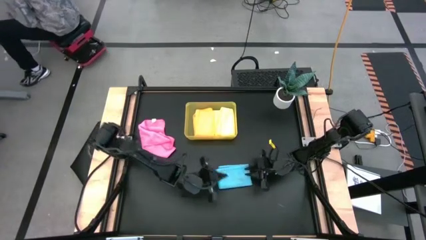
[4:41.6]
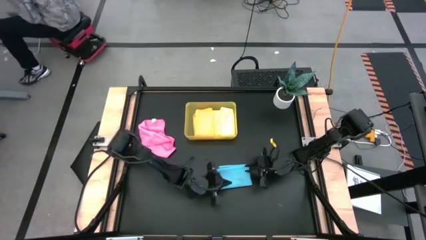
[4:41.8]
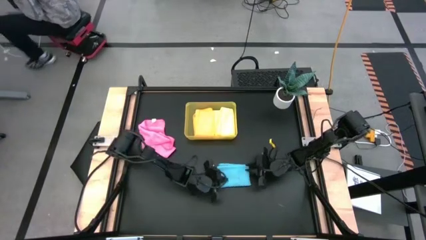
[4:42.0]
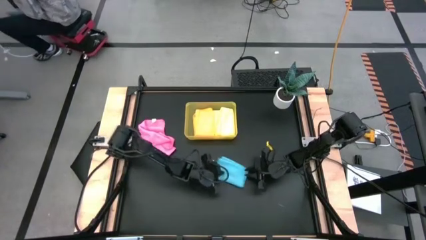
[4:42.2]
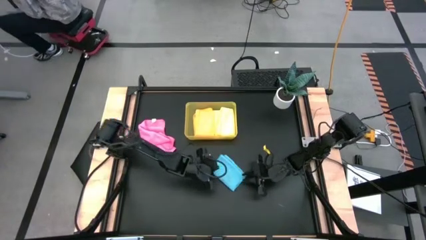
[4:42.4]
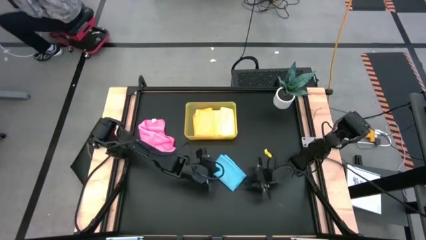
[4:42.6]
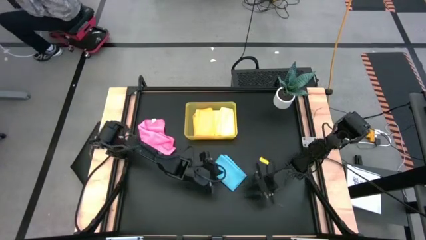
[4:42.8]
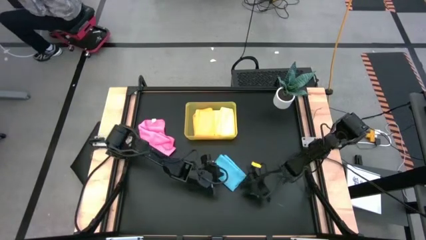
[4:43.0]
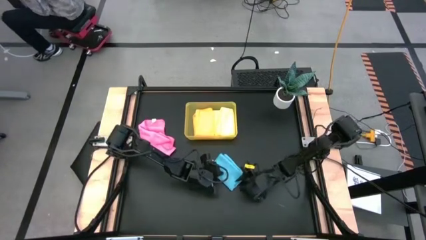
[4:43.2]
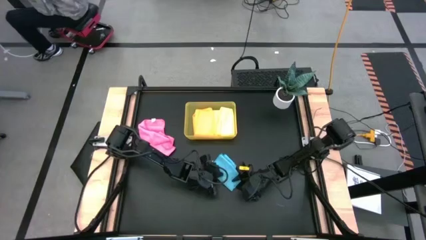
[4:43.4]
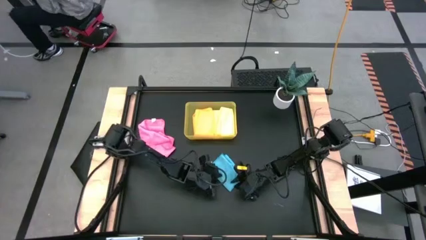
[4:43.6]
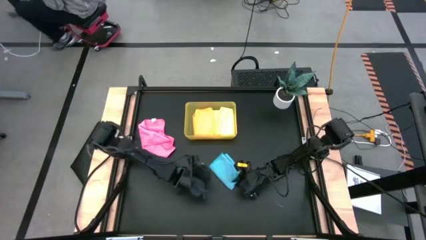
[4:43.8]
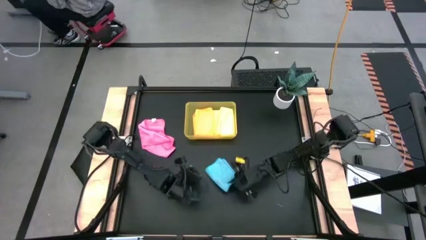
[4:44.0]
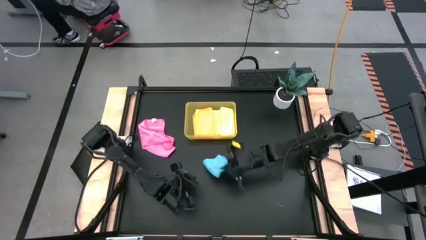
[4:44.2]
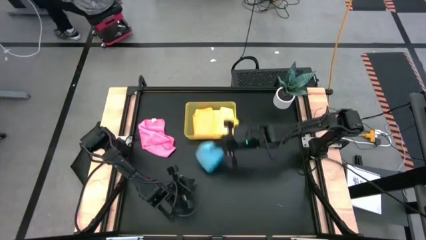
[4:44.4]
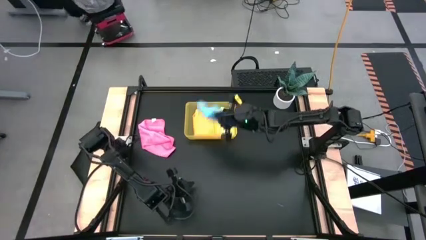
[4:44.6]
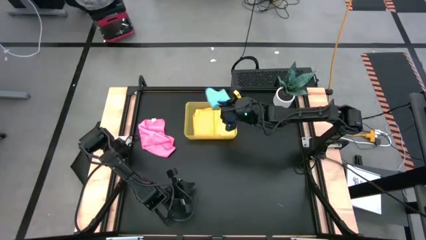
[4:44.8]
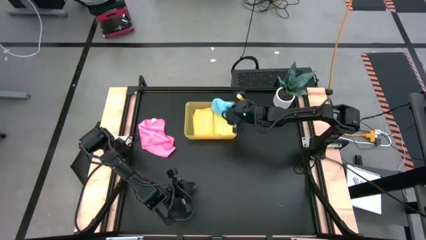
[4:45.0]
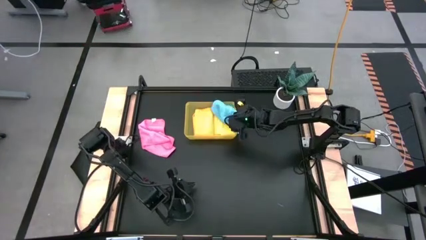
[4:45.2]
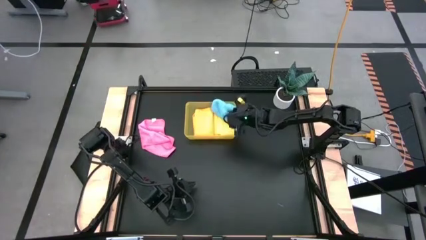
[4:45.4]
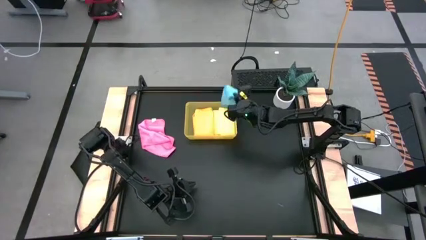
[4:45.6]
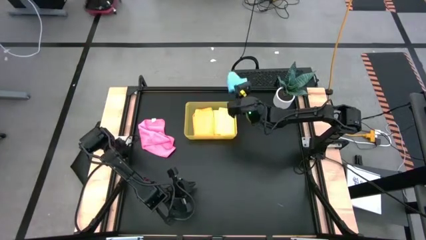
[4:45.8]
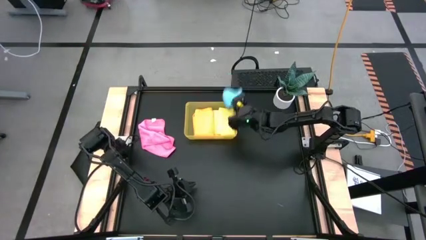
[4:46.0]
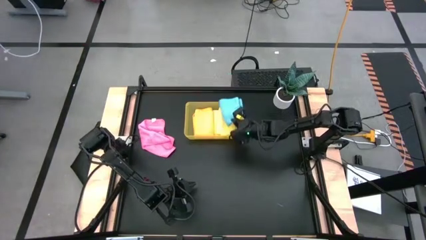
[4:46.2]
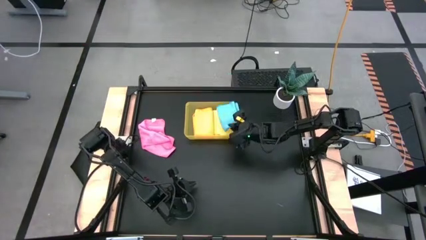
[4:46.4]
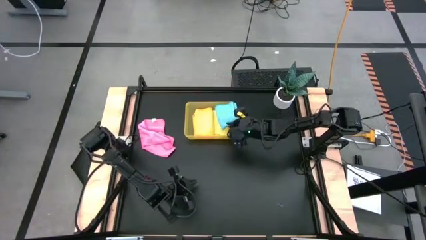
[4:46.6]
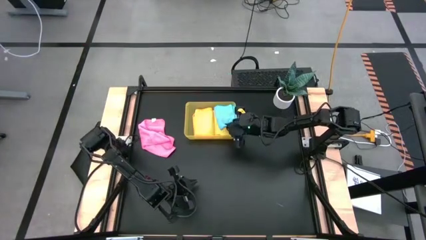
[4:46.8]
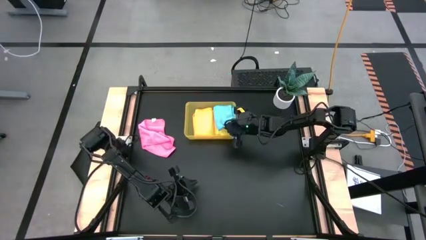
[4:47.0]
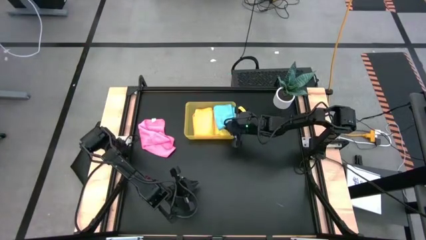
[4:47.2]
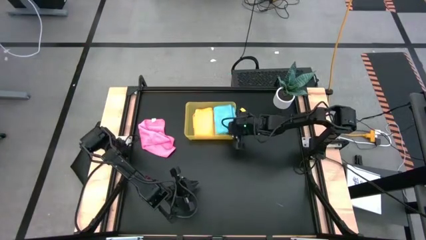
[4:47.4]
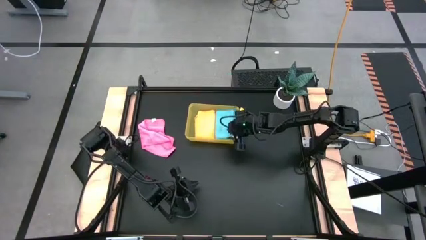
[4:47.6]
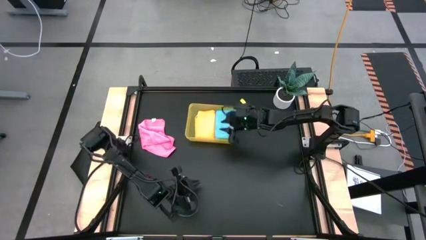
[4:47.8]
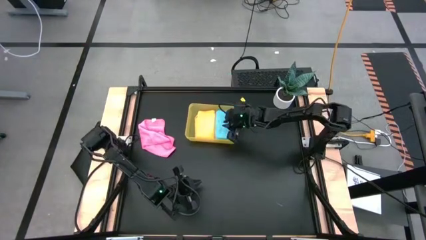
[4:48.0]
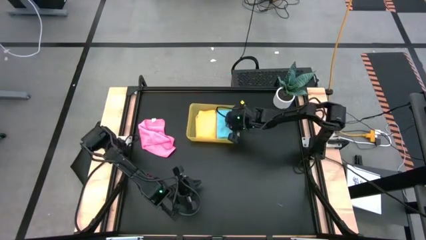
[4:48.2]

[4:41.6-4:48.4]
Task: Fold microfiber towels
Put the blue folded microfiber cloth in the yellow bin
